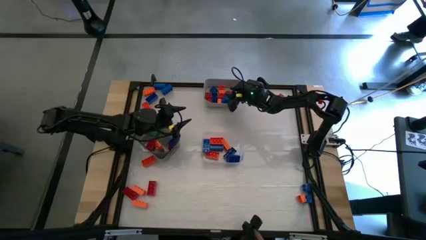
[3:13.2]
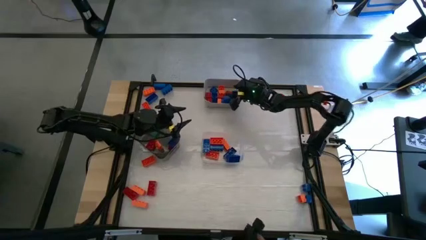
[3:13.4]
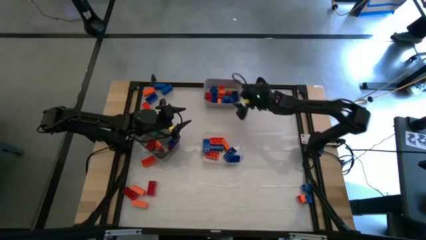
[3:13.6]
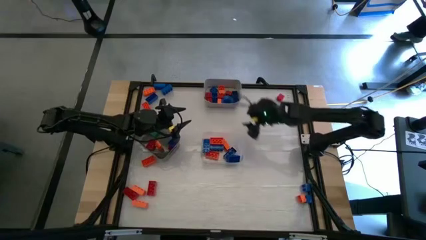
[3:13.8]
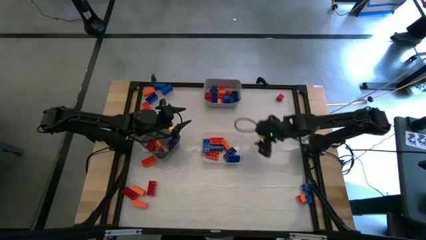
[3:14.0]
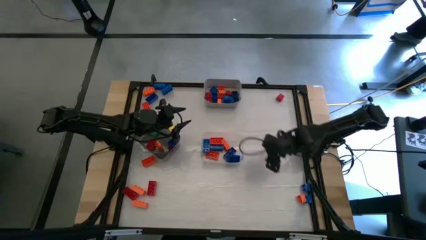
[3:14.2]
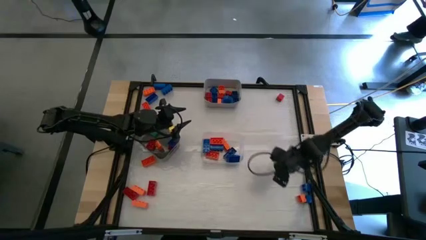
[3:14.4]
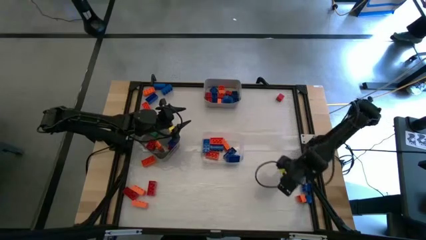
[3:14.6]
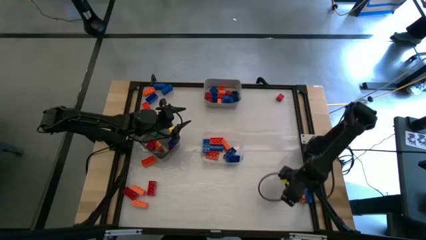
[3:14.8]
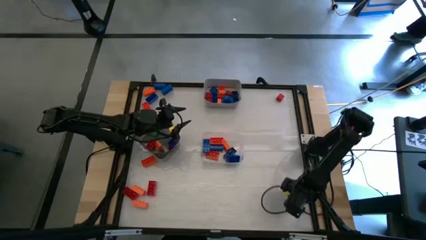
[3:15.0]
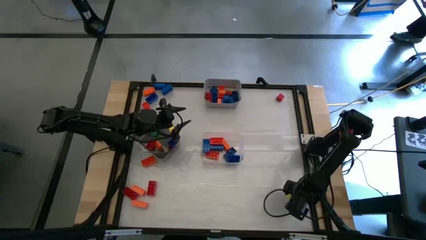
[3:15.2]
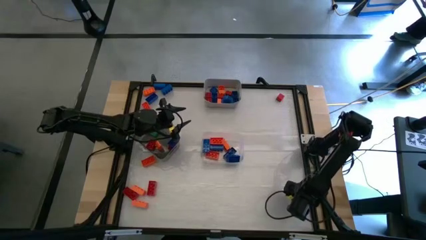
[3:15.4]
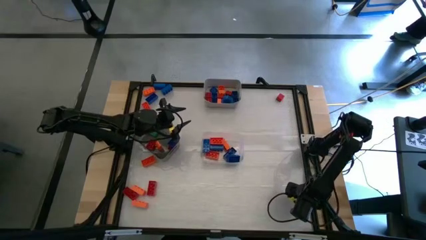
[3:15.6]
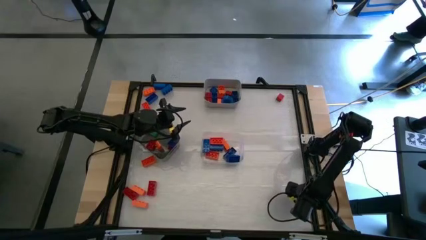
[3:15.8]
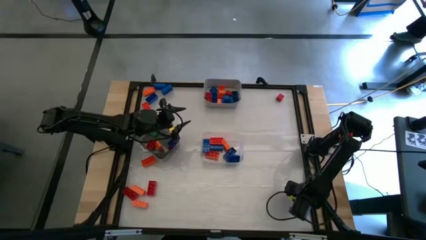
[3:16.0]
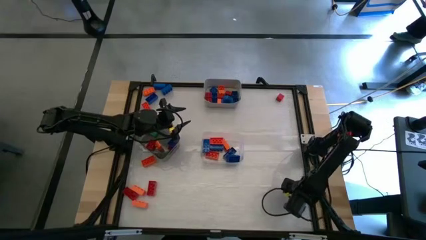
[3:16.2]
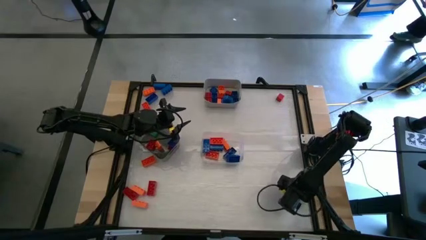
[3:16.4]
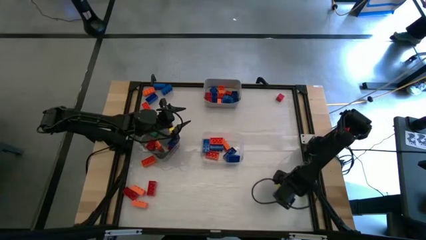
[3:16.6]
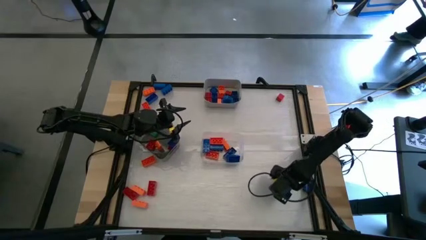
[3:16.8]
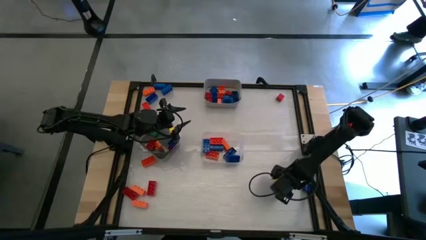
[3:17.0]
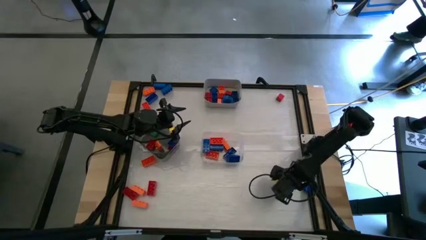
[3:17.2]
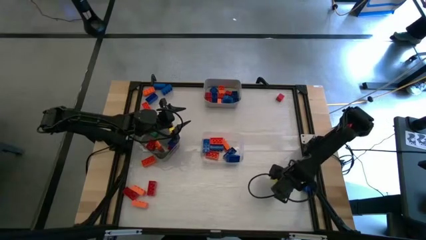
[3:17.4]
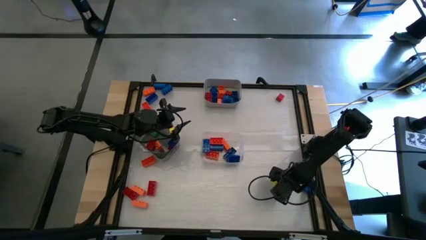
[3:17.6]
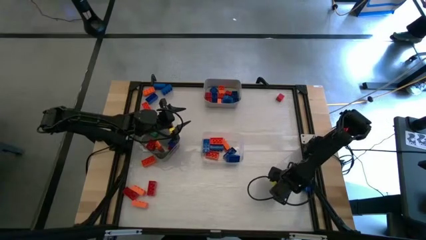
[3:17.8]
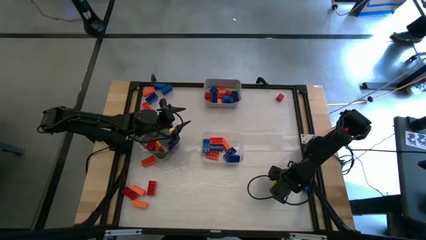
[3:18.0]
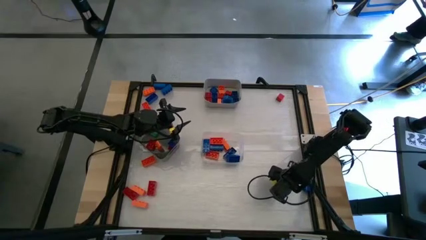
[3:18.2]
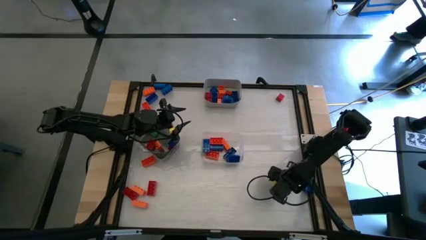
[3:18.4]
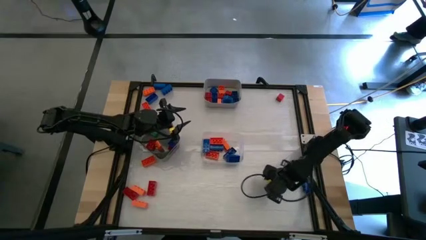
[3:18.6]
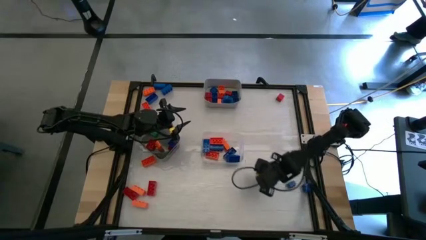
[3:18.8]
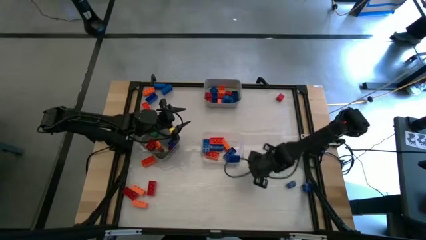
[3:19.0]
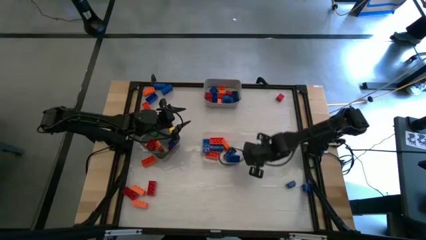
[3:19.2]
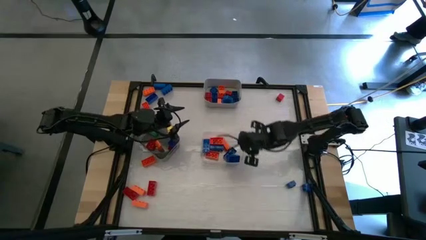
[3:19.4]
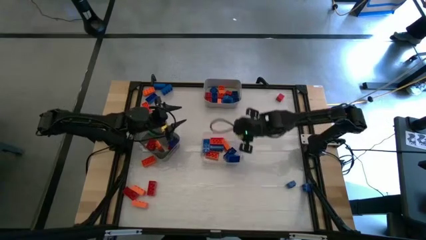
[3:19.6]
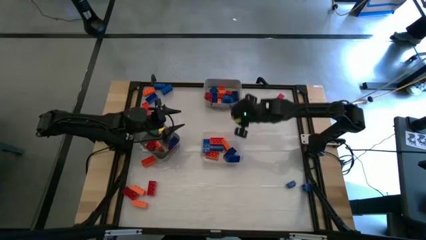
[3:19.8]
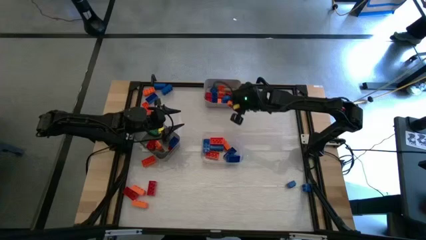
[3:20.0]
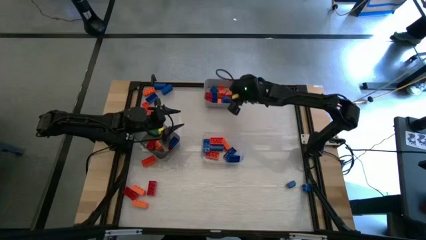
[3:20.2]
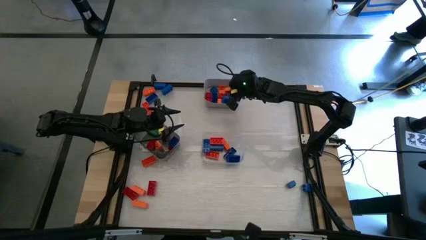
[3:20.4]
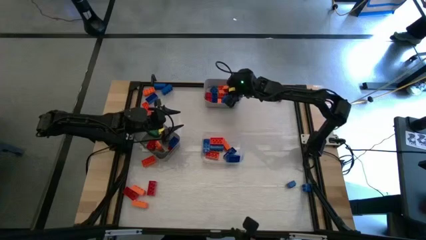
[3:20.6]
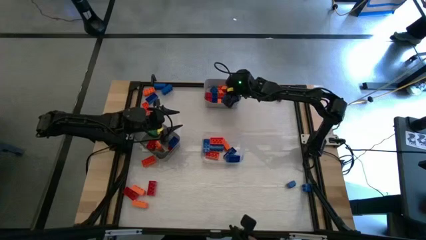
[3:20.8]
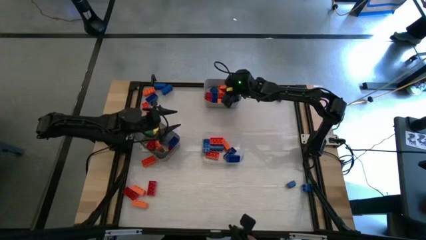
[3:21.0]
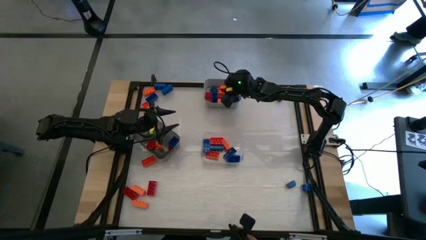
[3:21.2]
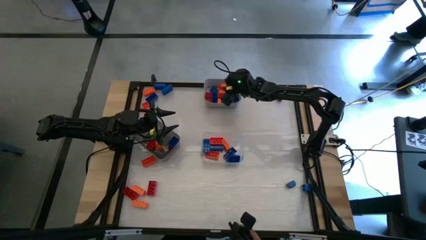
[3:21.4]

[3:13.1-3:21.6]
Task: Sort blocks by size
Put the small orange game piece into the gray bin

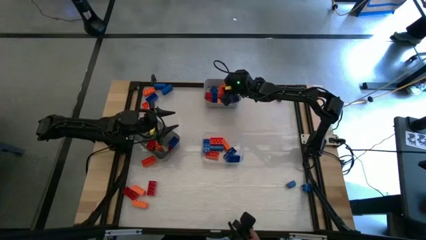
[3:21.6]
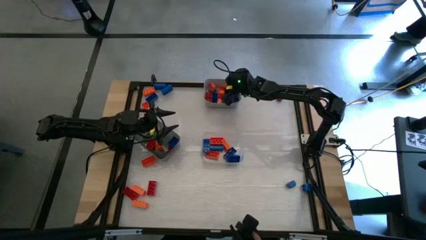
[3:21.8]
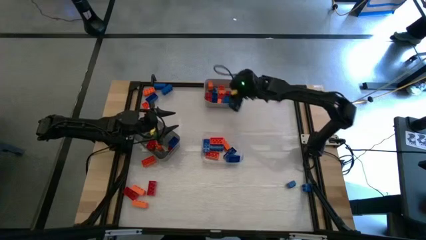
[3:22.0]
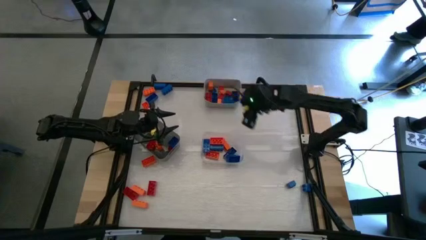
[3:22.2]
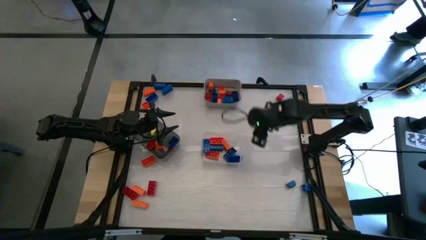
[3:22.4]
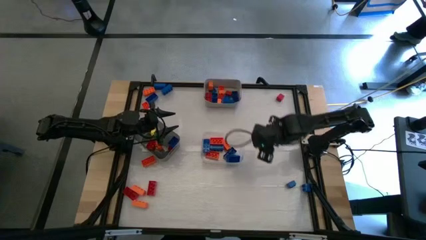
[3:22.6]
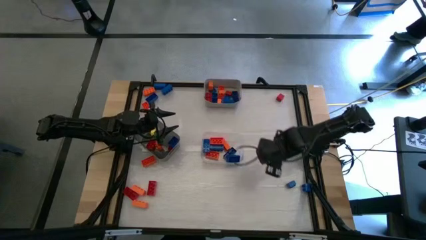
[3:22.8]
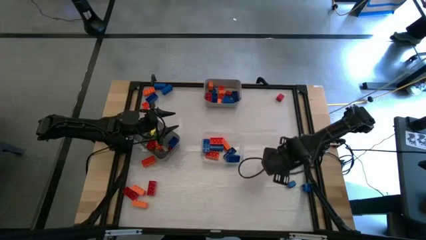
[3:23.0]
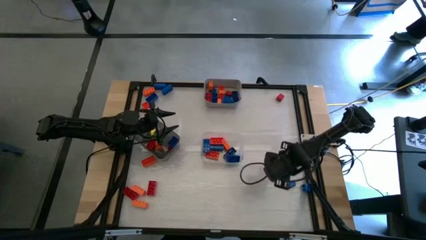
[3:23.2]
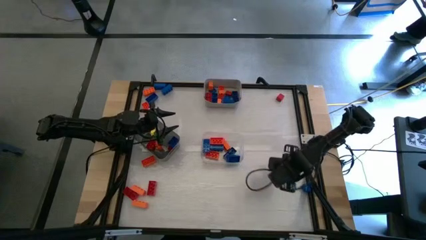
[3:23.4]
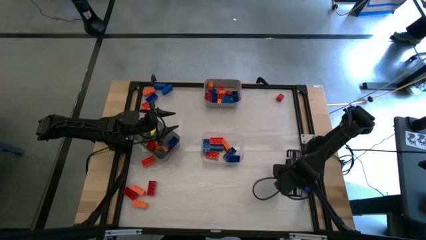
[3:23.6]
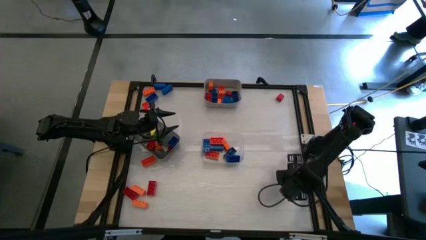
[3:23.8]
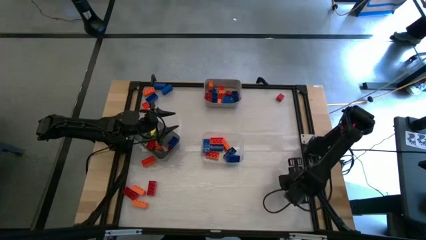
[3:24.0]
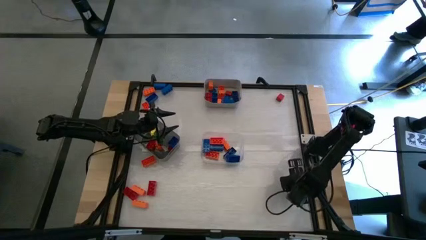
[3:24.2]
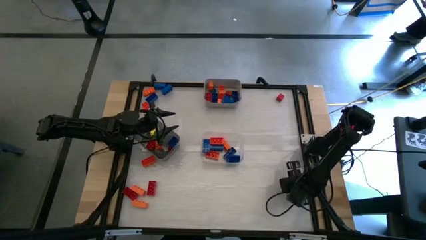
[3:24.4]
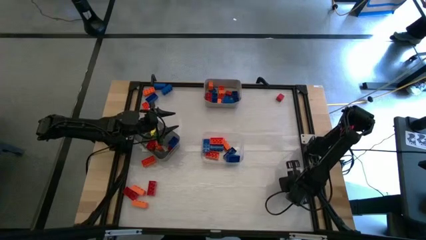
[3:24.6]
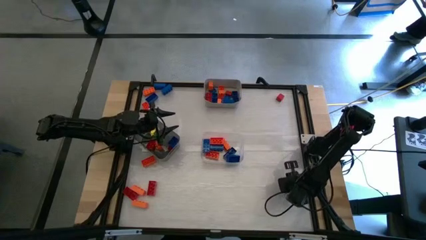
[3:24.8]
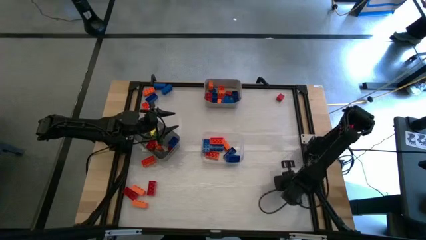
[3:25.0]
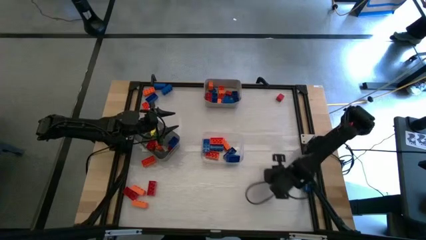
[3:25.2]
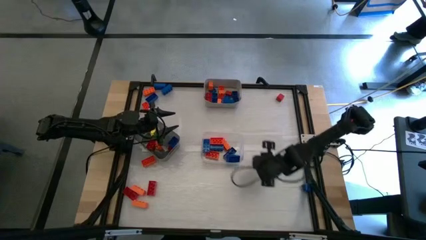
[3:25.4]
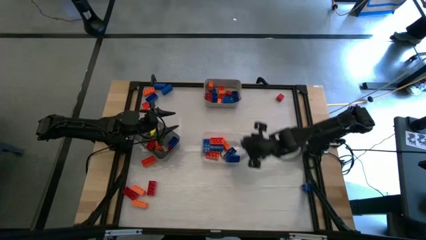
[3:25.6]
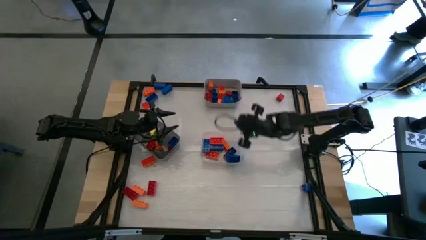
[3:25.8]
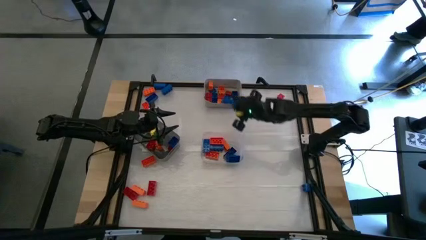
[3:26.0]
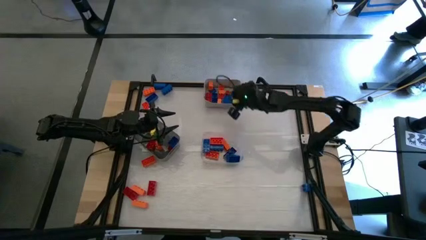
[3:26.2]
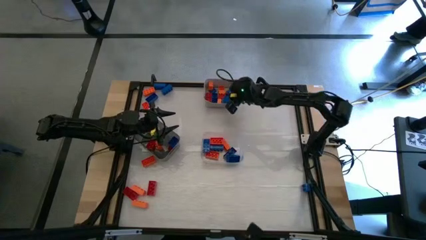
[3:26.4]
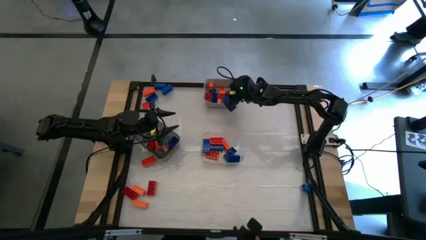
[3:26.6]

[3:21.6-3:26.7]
Put the blue game piece into the gray bin

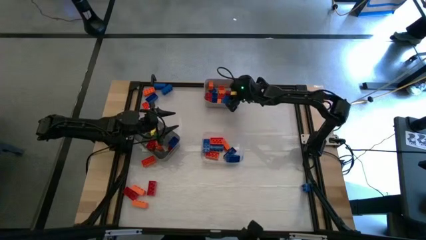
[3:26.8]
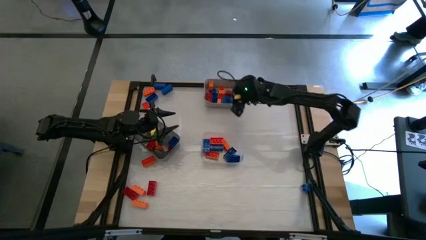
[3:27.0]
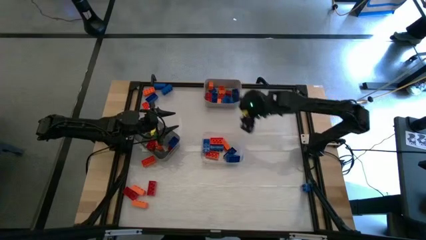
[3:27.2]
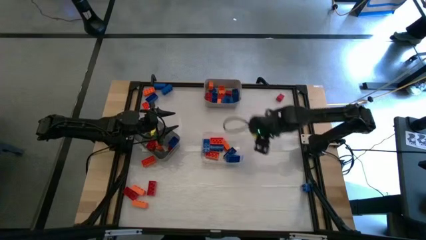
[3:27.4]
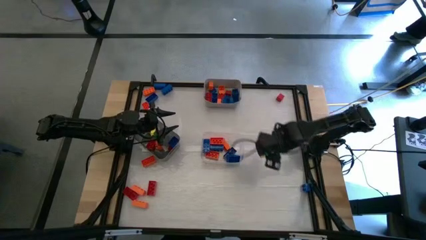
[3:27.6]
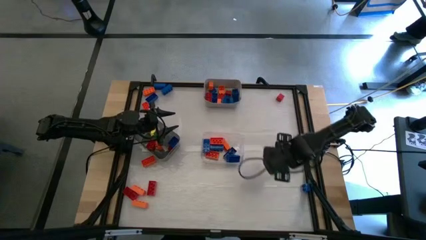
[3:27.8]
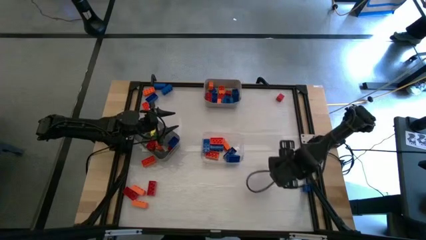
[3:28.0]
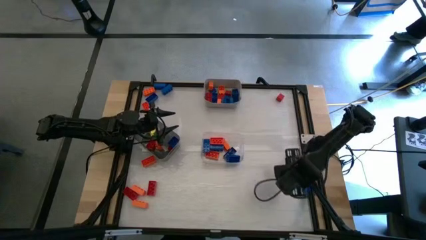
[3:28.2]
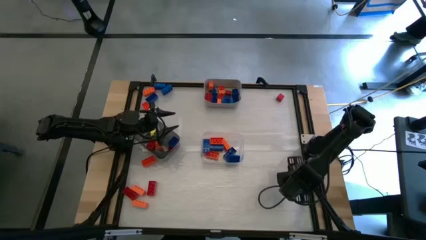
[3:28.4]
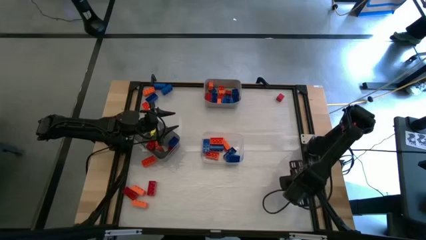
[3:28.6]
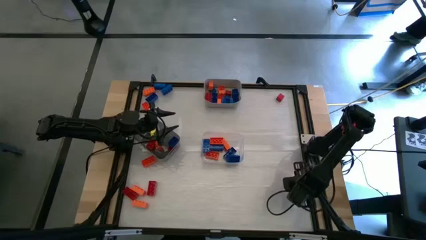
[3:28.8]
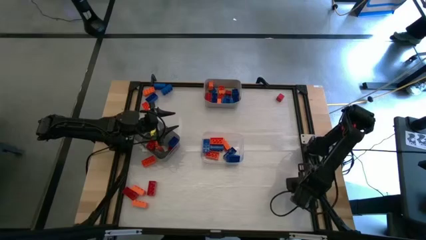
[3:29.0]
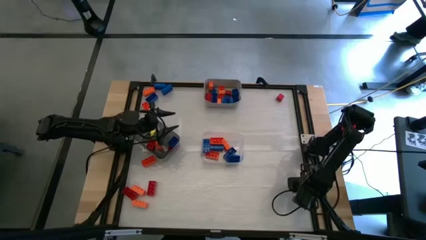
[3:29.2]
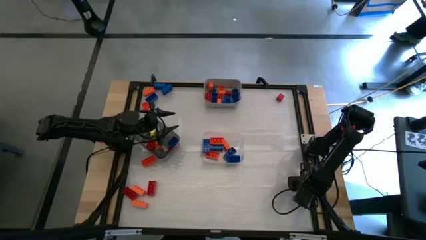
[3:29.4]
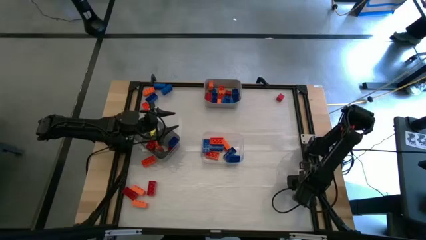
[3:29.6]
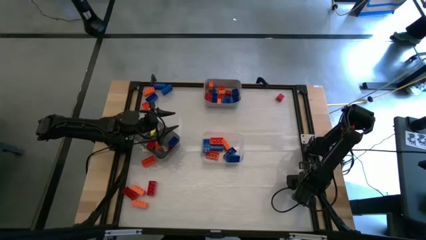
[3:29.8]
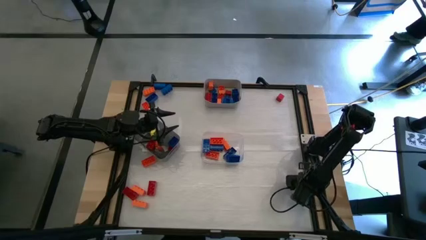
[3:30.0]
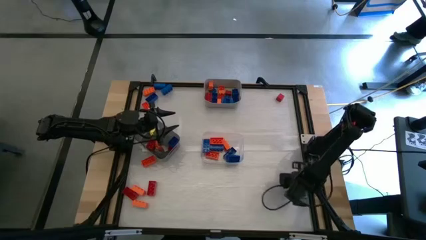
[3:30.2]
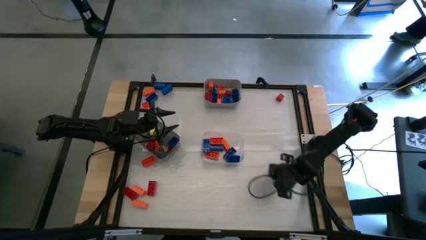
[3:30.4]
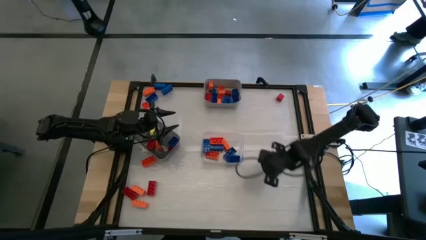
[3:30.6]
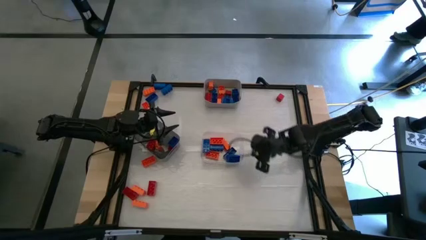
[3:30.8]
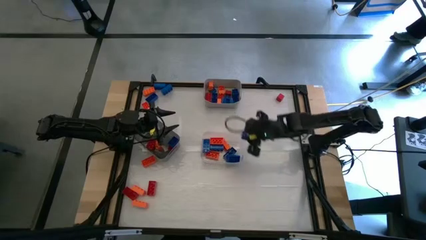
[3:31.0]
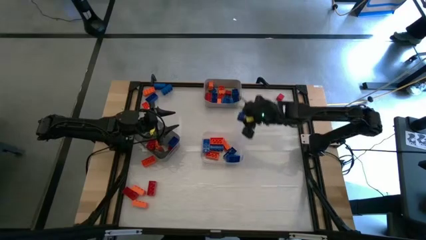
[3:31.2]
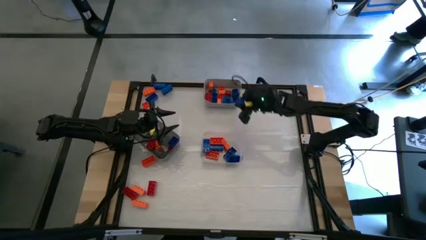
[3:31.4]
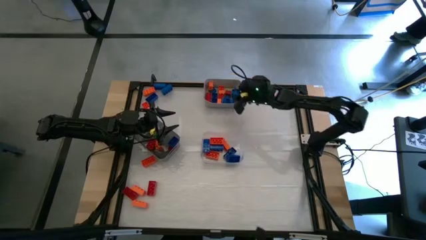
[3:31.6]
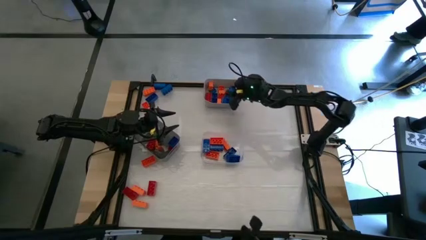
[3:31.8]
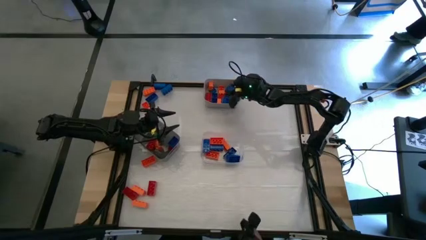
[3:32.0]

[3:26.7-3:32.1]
Put the small blue game piece into the gray bin
